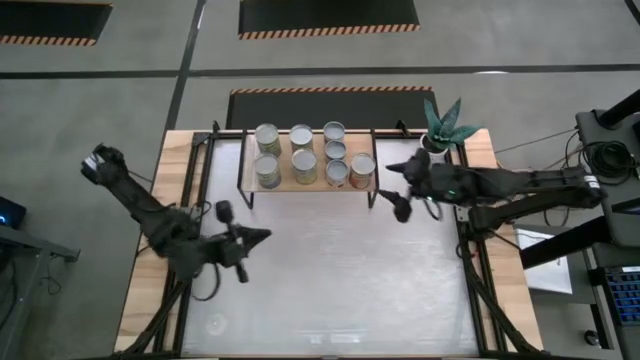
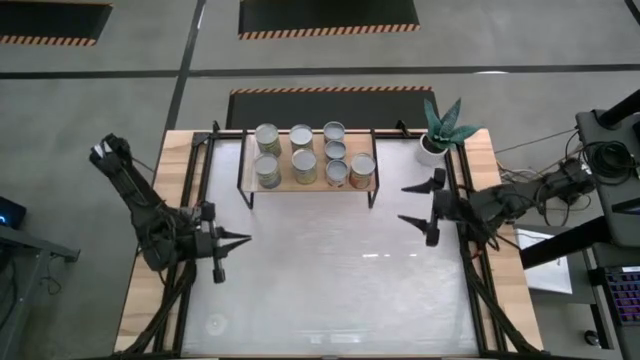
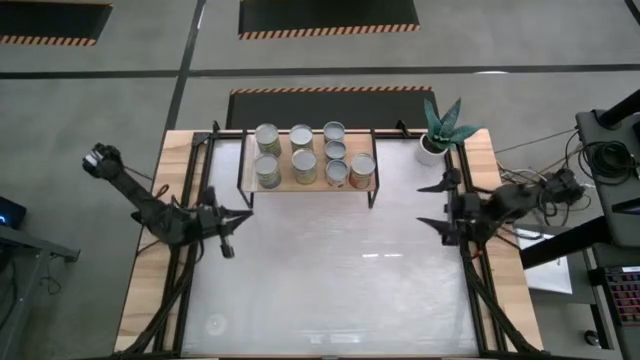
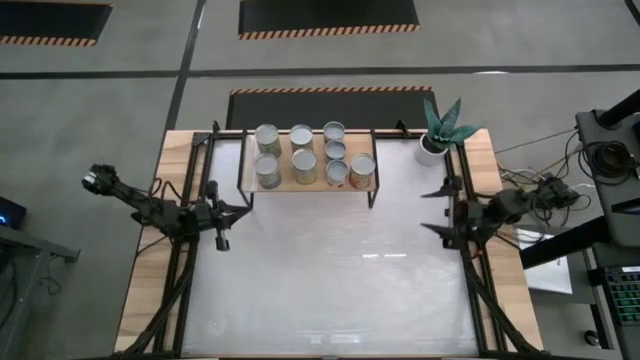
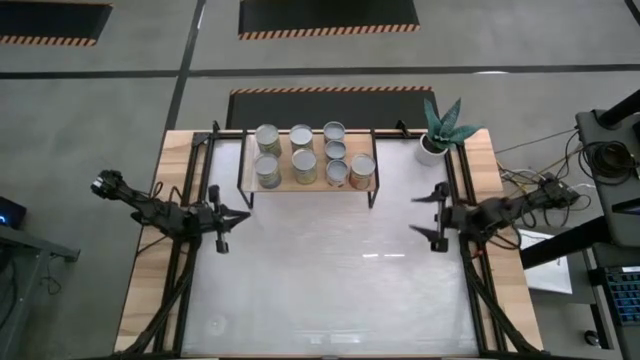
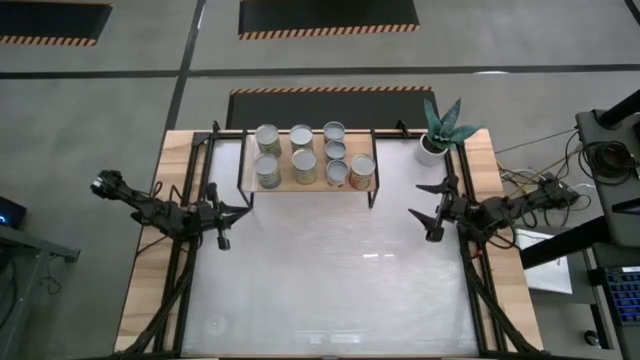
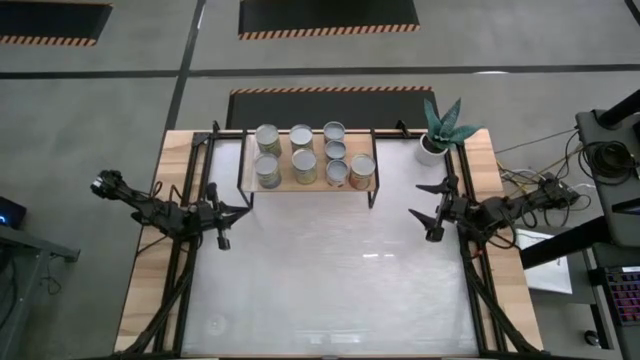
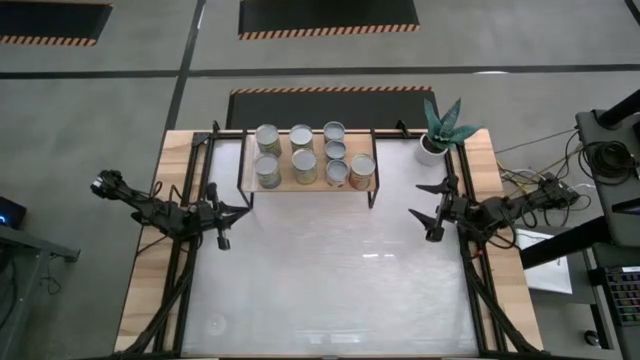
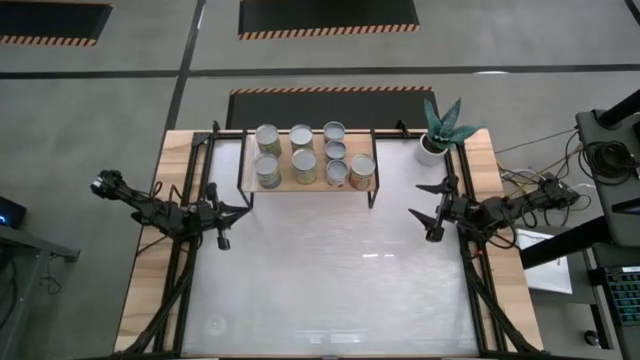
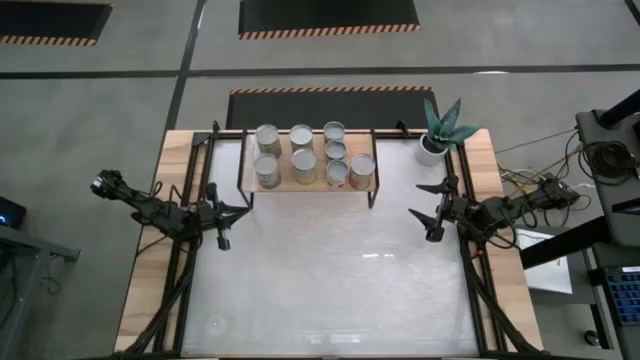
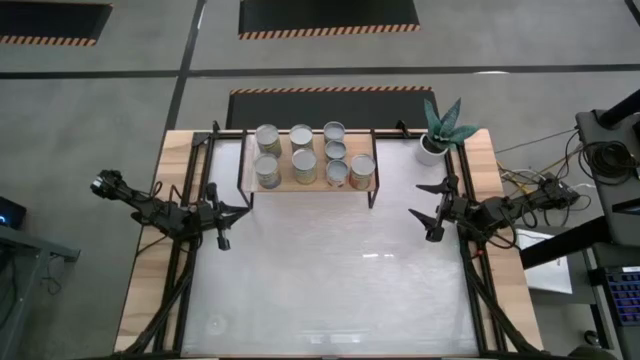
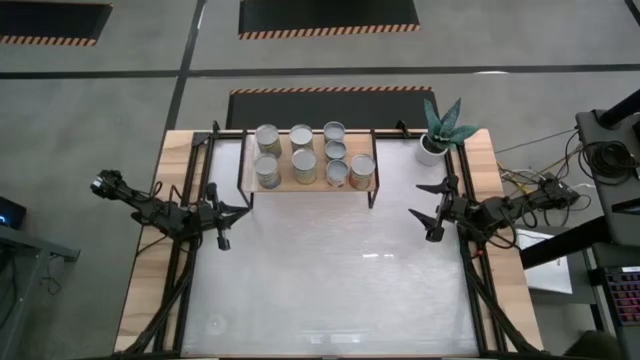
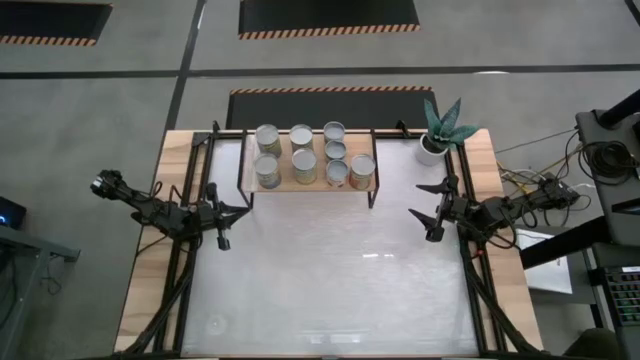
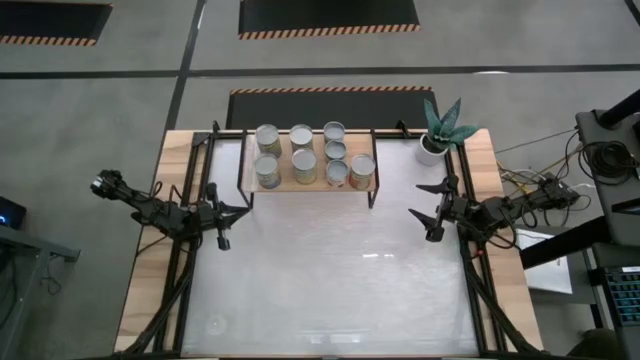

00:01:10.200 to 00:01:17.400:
Task: Pick and place cans onto a shelf
Return to Home Position

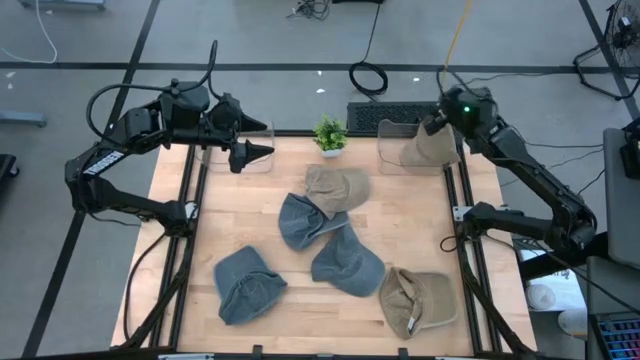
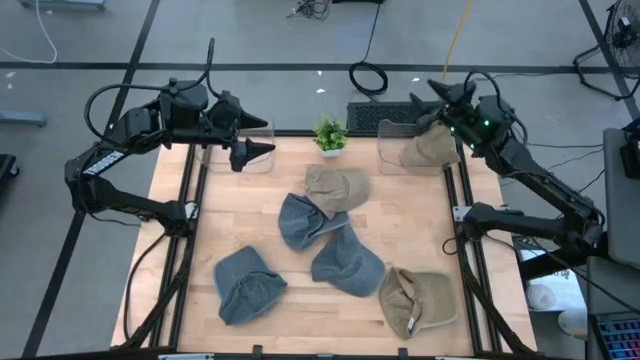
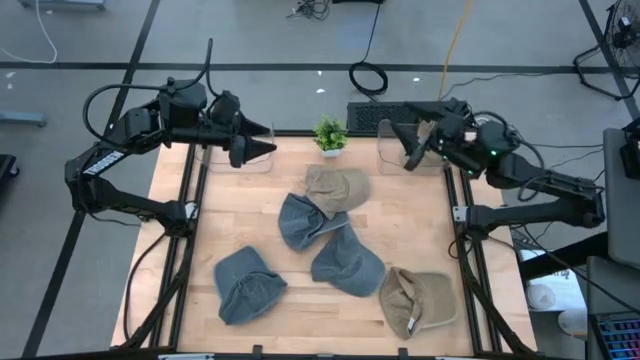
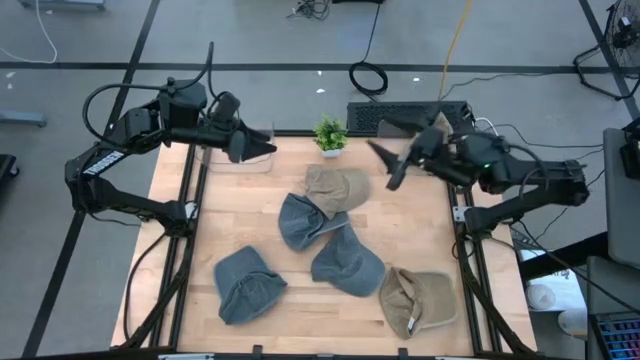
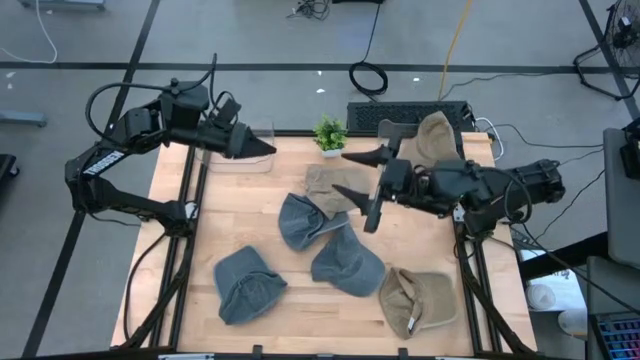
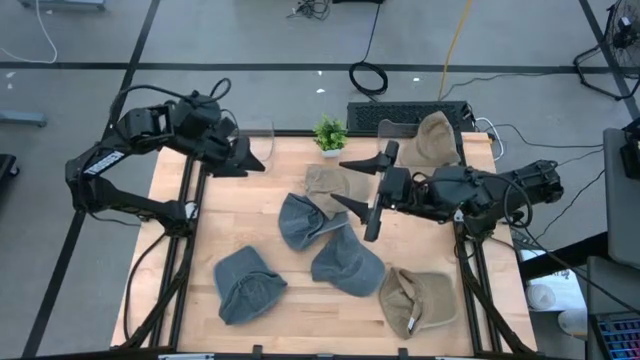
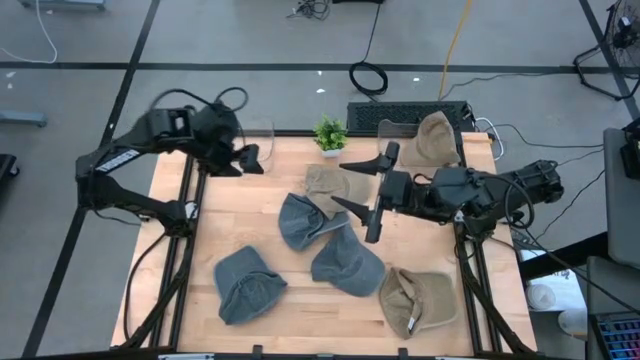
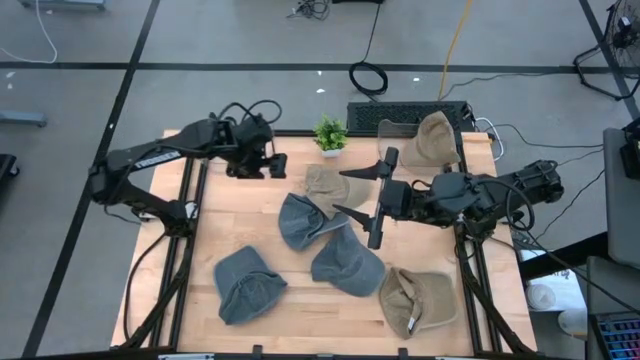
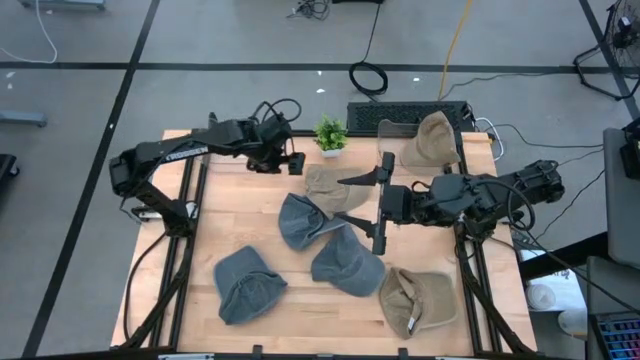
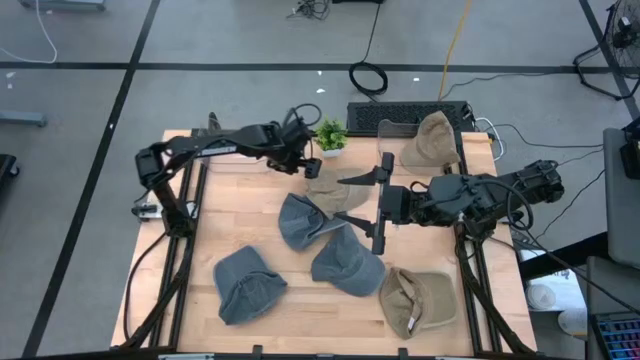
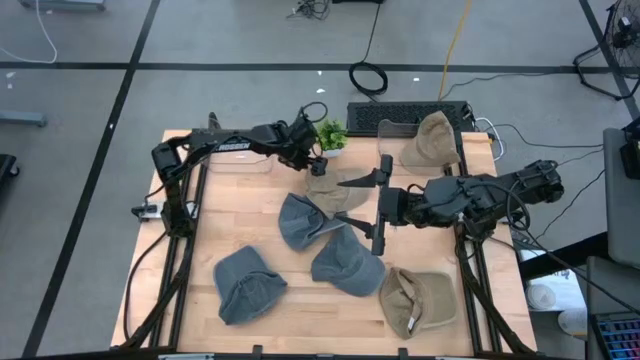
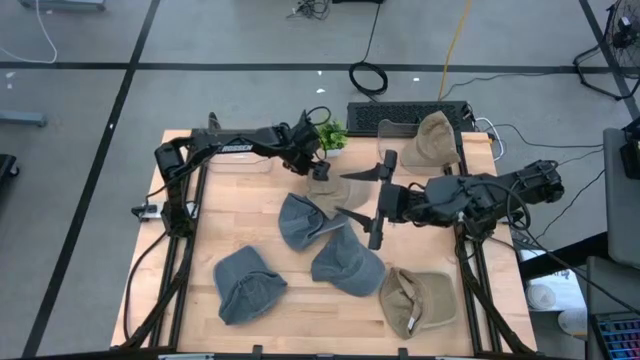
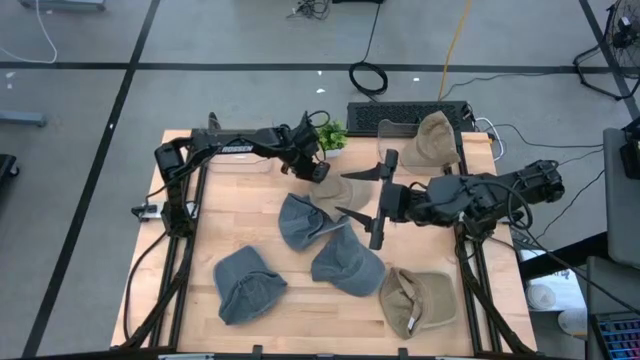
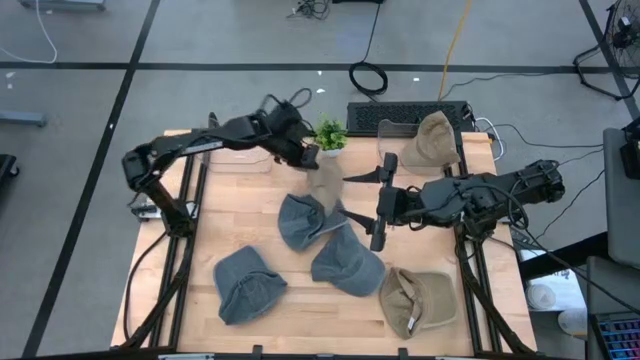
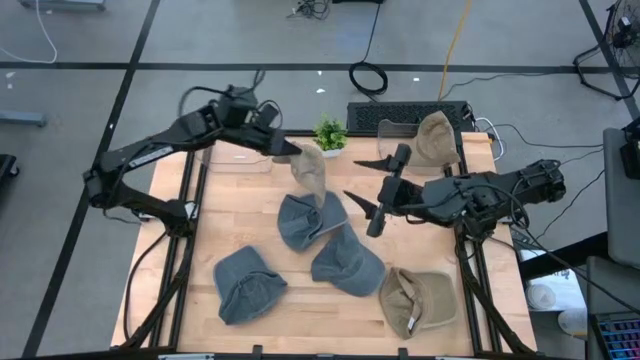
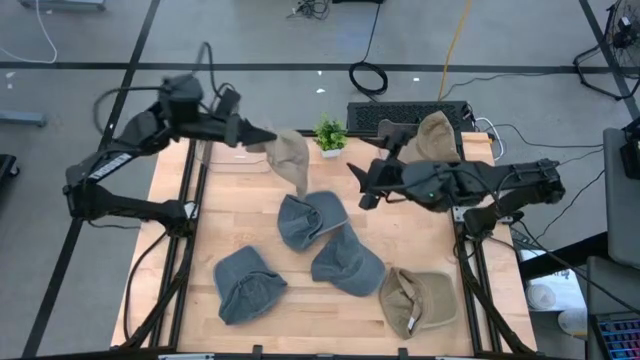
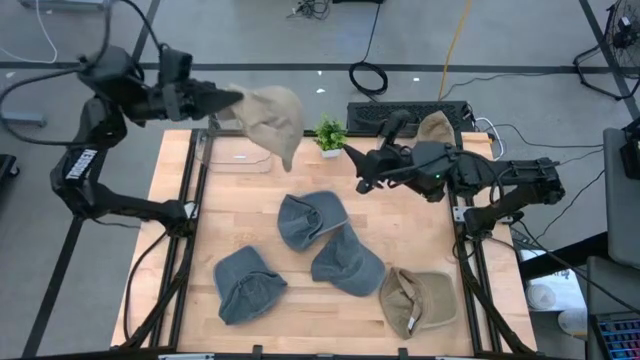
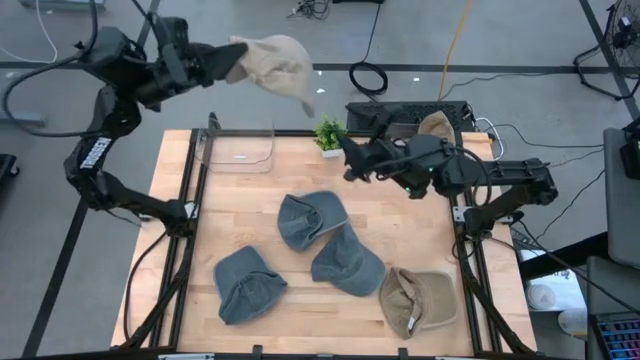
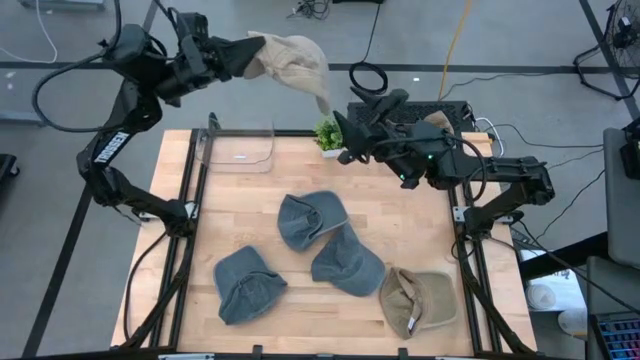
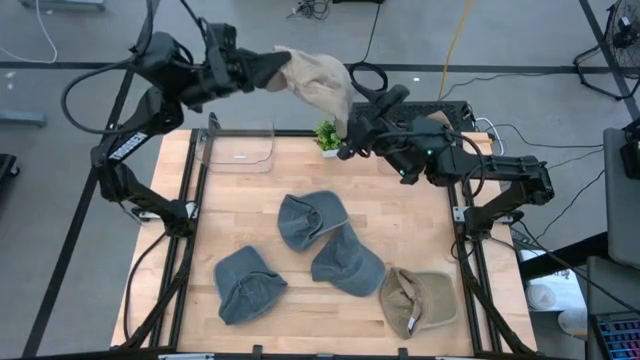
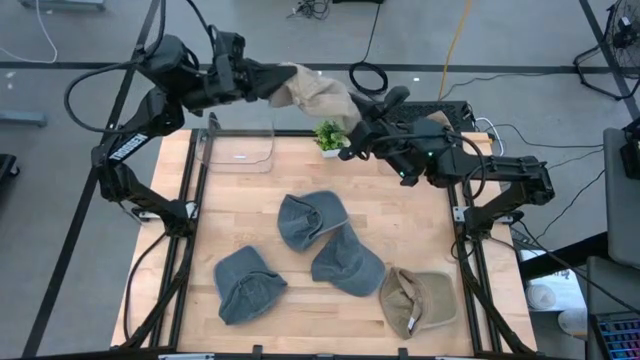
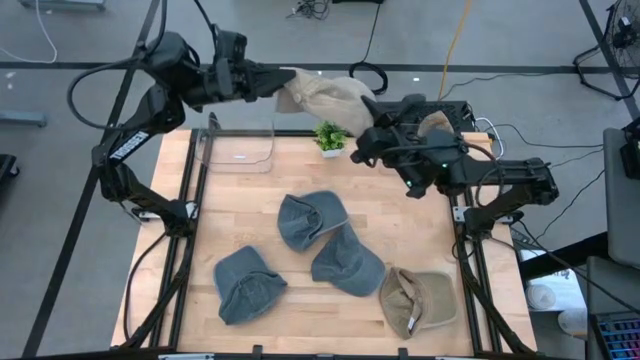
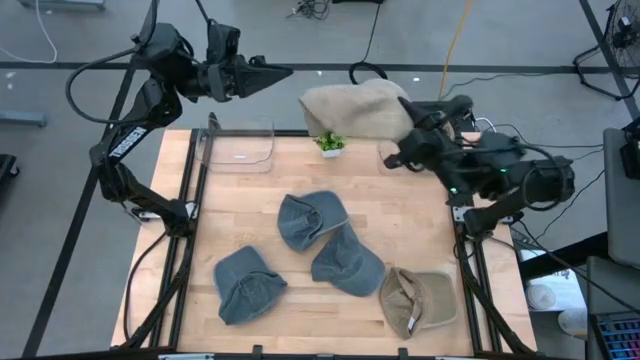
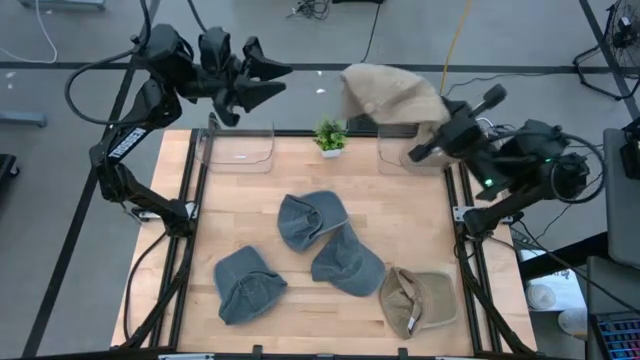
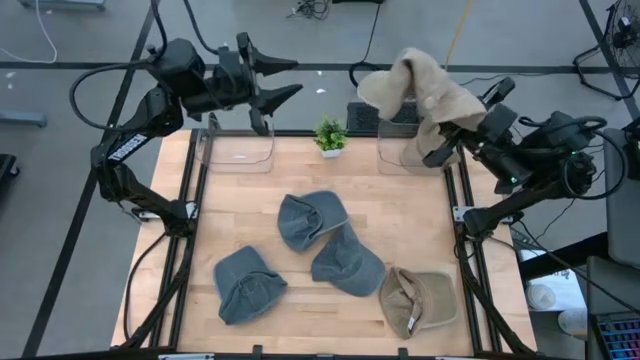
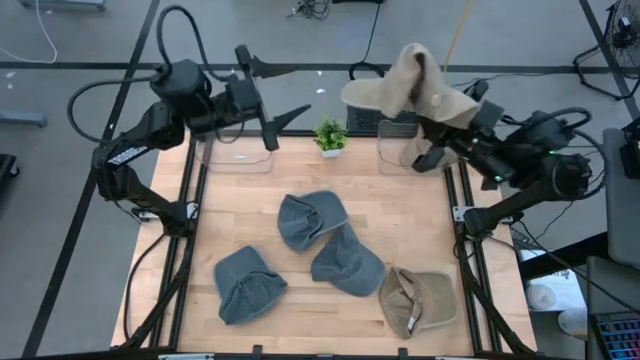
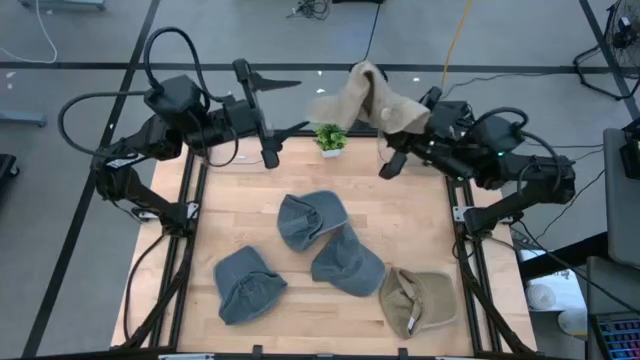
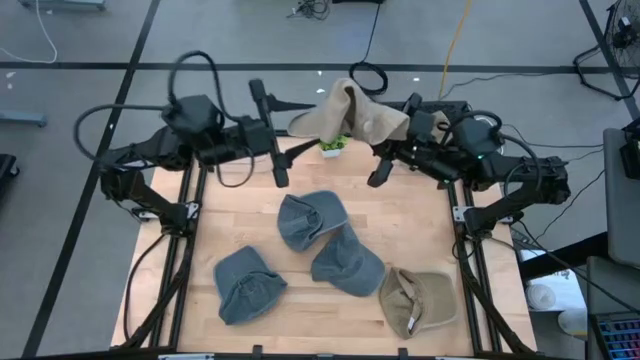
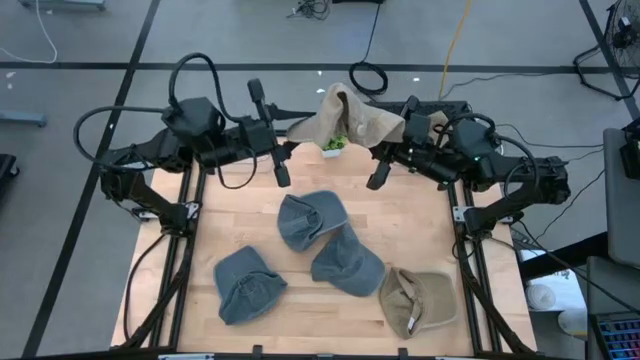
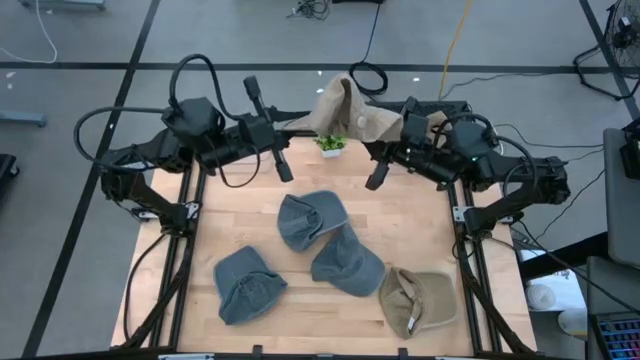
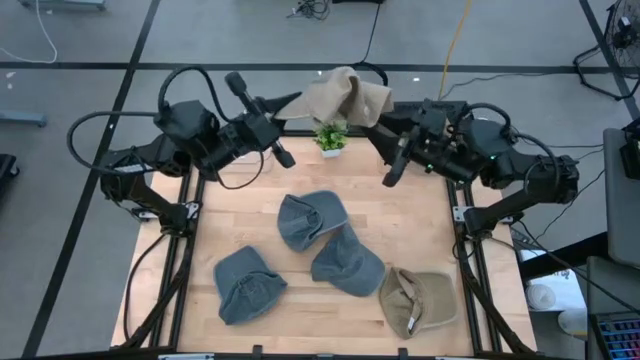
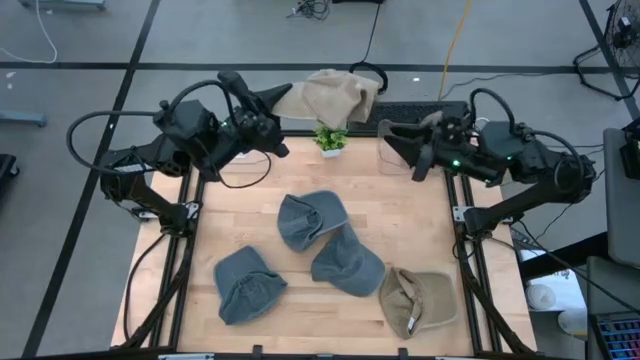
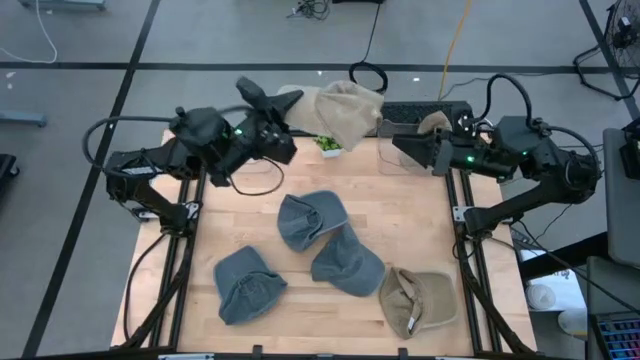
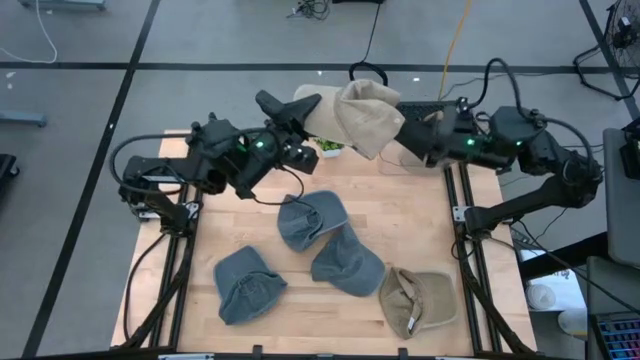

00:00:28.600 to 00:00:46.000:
Task: Pick & Place hat
Put the top brown cap into the right transparent bin
